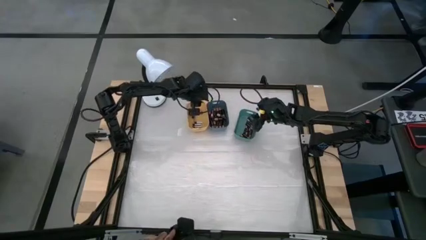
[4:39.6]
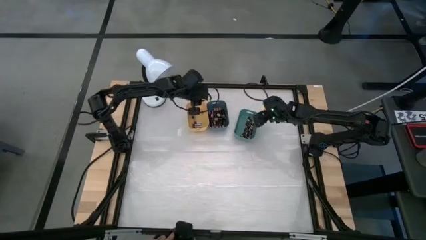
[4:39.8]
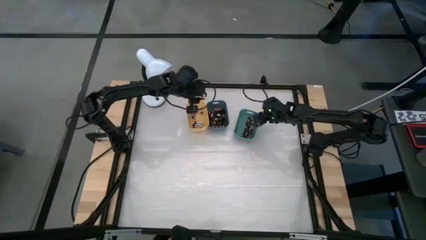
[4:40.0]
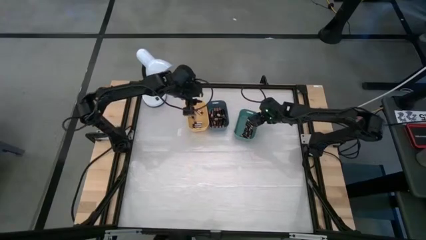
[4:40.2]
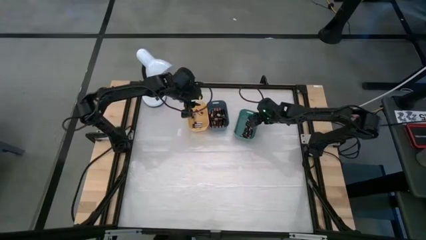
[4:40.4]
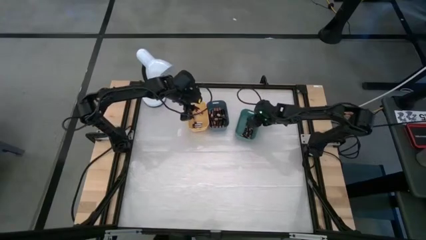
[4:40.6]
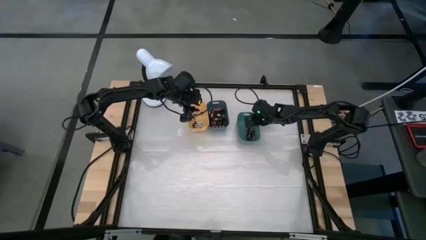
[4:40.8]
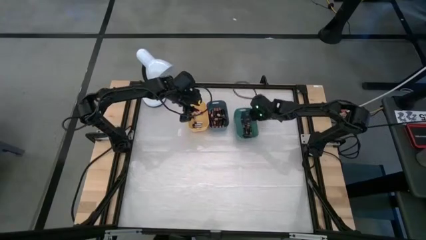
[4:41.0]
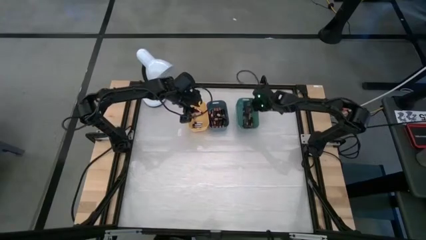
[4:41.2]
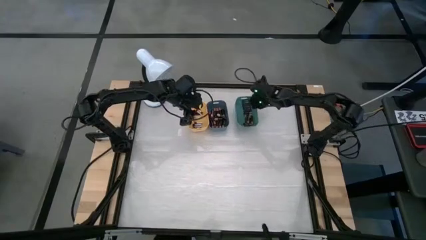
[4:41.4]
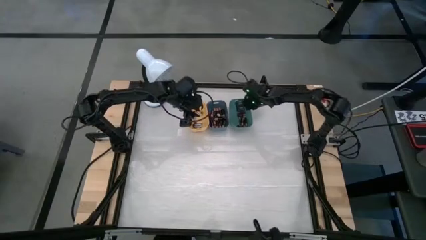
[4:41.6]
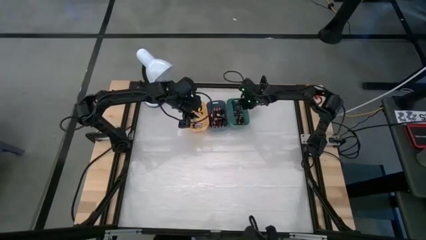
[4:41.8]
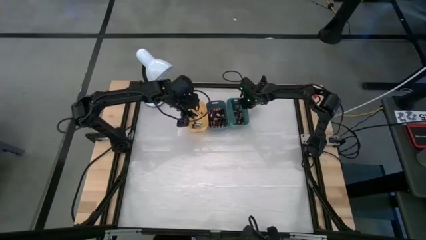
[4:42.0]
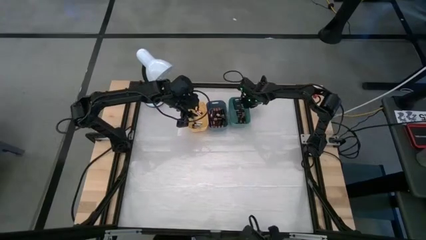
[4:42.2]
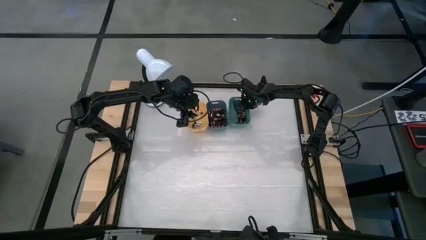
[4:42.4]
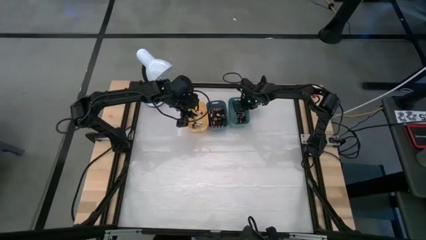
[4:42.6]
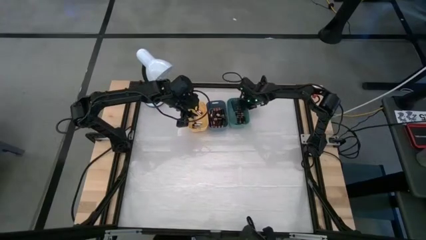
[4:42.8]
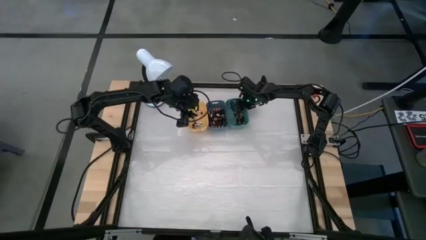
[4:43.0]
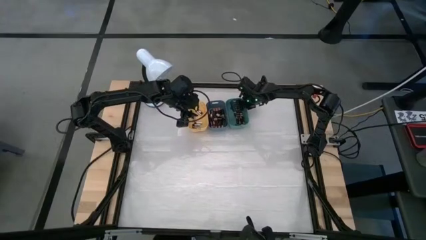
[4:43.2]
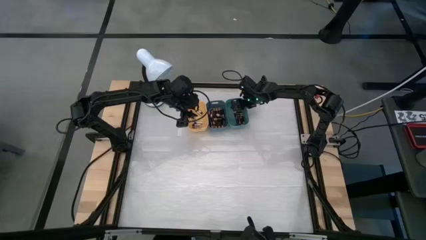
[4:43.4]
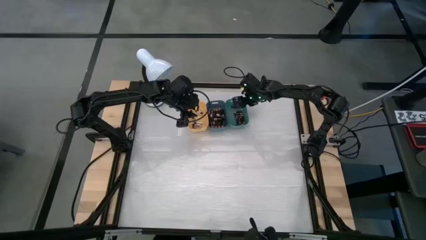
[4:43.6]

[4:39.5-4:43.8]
Task: Sort batteries
Adjust the green bin

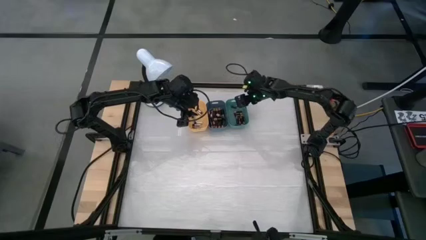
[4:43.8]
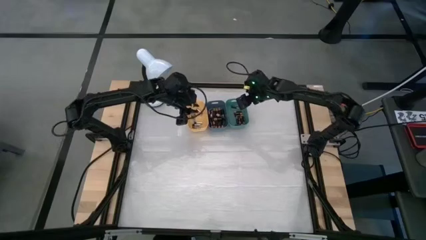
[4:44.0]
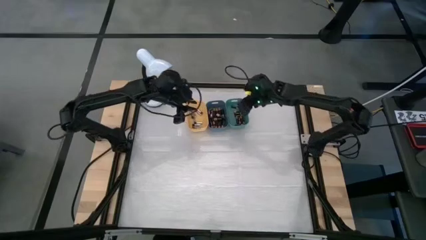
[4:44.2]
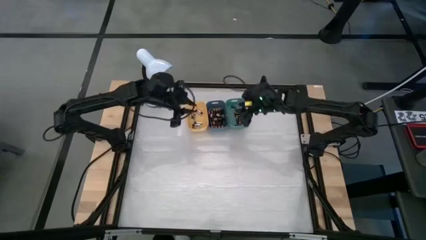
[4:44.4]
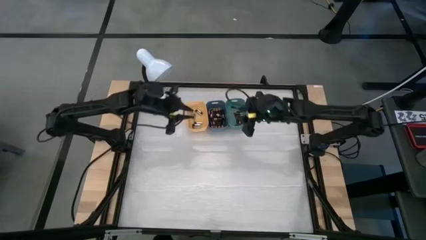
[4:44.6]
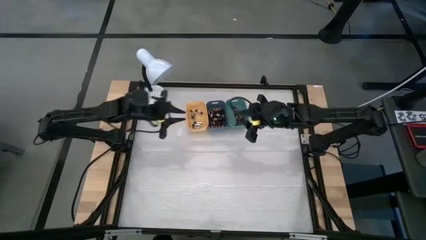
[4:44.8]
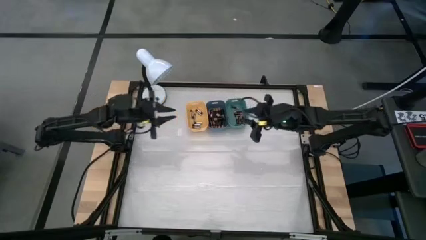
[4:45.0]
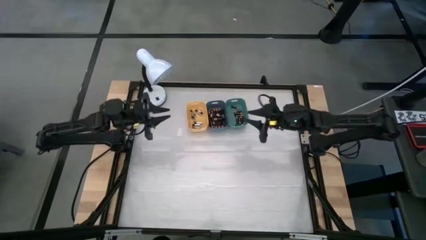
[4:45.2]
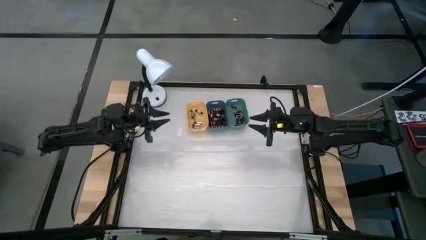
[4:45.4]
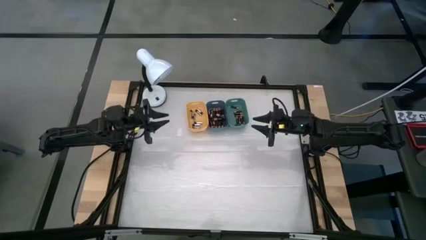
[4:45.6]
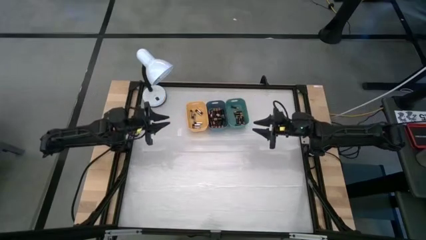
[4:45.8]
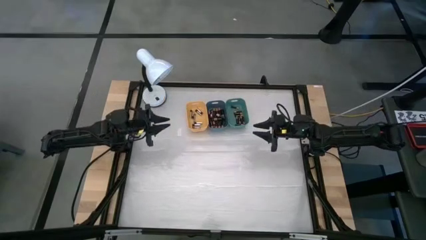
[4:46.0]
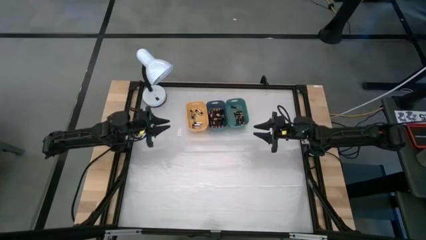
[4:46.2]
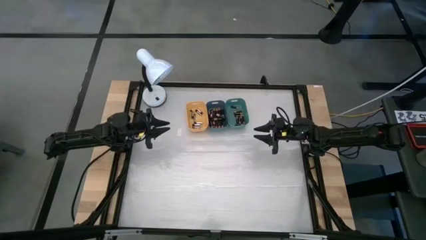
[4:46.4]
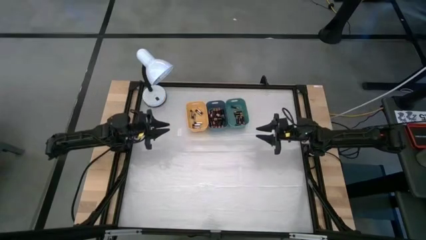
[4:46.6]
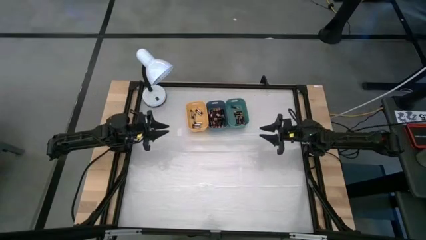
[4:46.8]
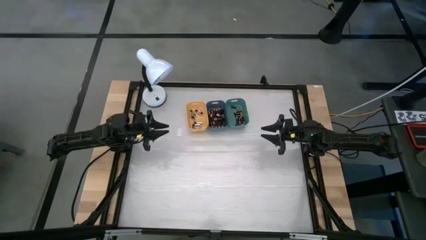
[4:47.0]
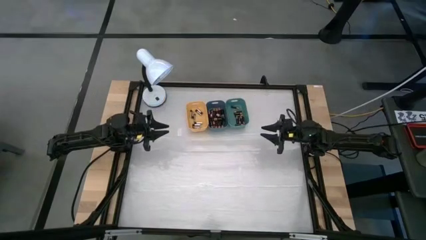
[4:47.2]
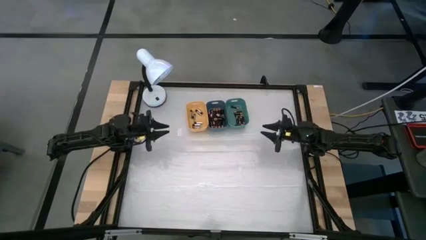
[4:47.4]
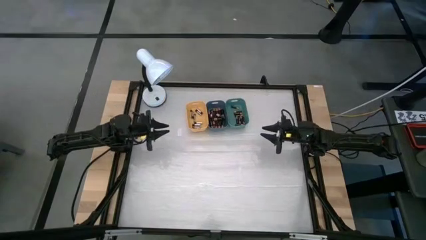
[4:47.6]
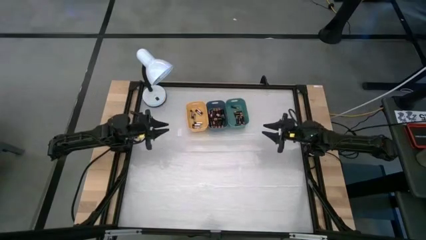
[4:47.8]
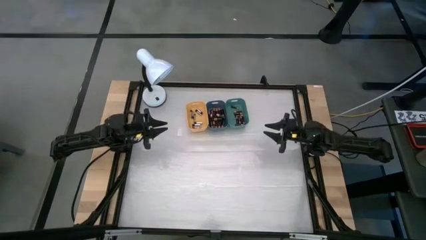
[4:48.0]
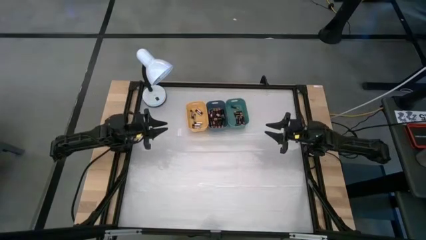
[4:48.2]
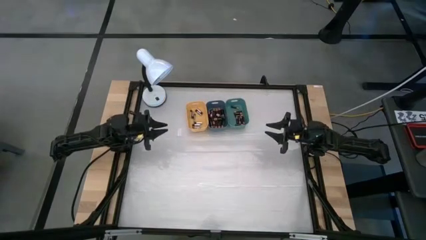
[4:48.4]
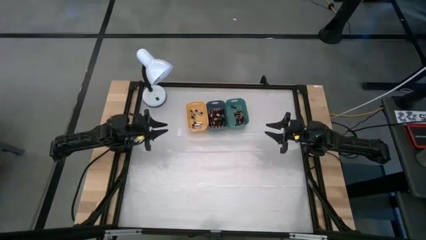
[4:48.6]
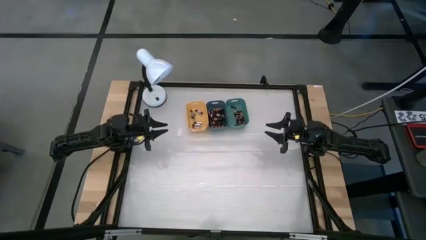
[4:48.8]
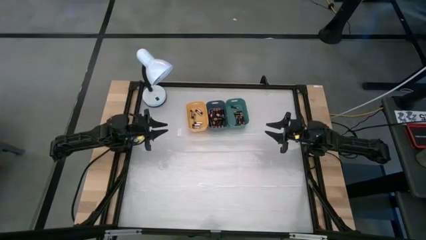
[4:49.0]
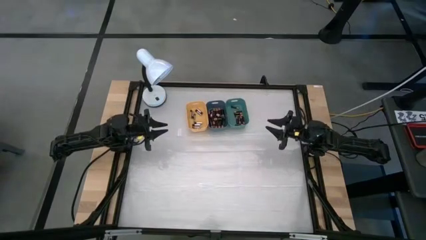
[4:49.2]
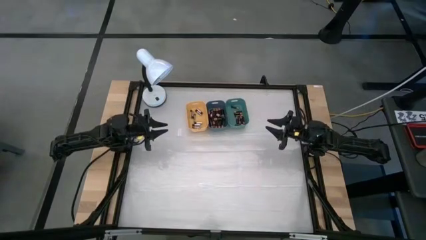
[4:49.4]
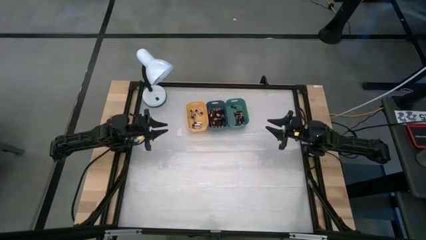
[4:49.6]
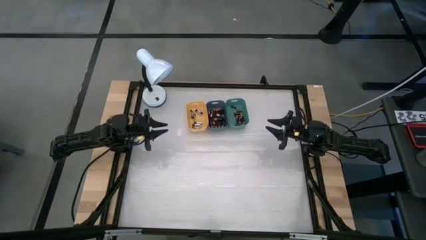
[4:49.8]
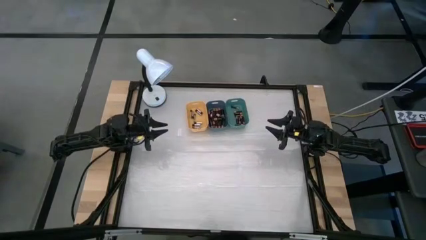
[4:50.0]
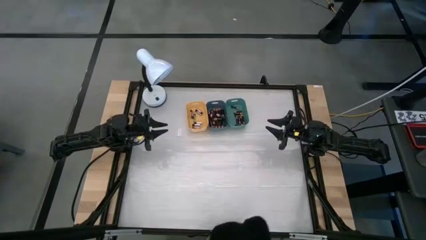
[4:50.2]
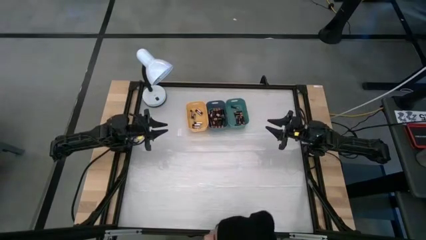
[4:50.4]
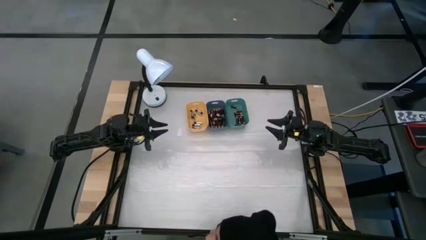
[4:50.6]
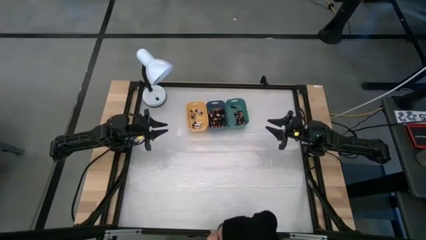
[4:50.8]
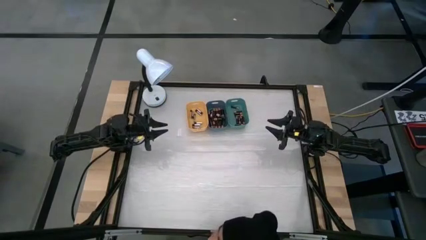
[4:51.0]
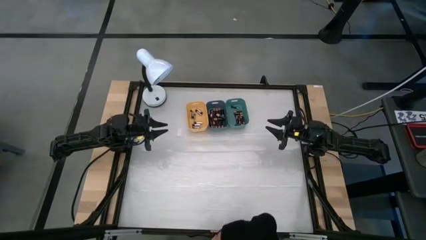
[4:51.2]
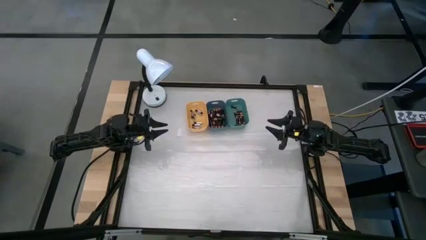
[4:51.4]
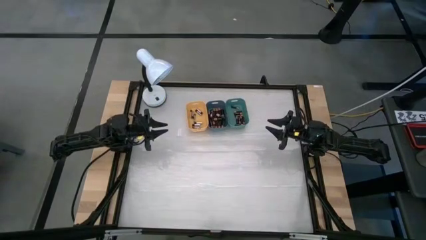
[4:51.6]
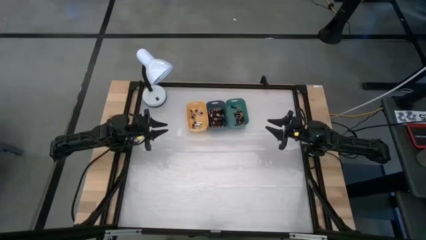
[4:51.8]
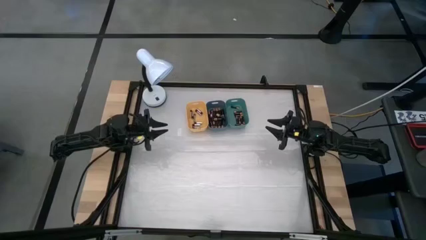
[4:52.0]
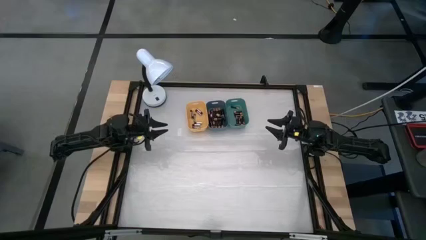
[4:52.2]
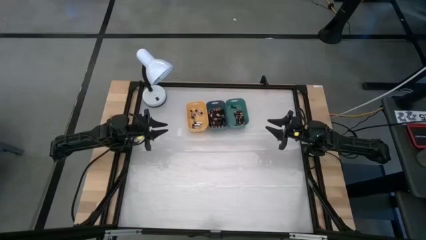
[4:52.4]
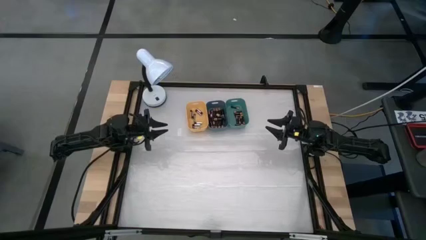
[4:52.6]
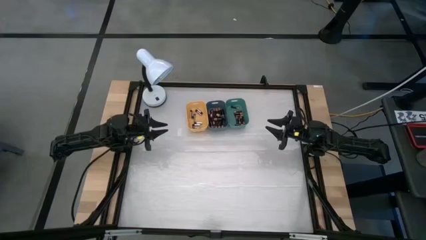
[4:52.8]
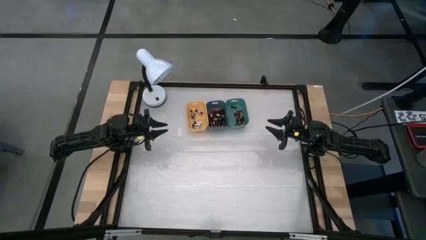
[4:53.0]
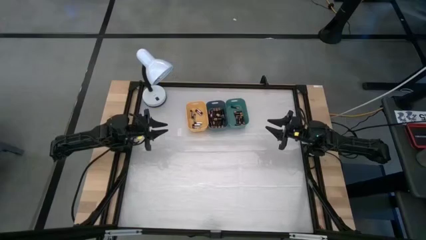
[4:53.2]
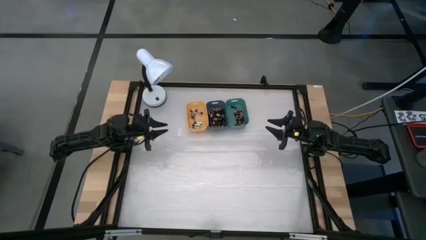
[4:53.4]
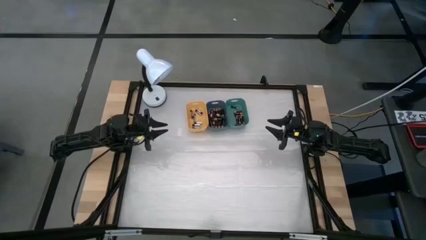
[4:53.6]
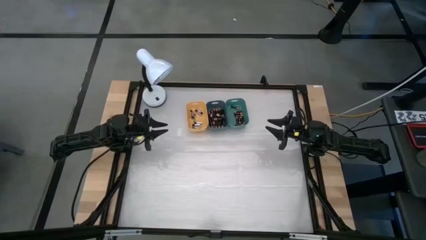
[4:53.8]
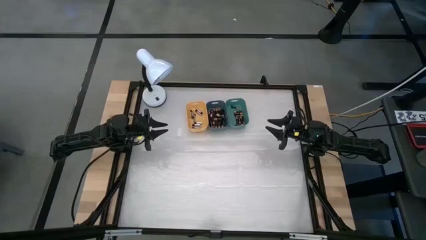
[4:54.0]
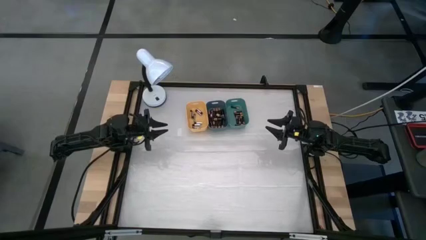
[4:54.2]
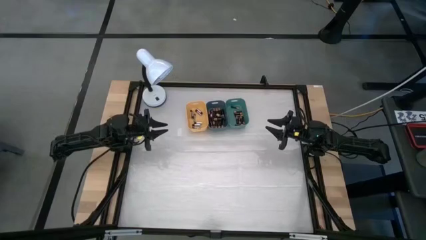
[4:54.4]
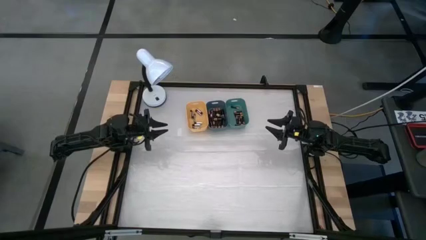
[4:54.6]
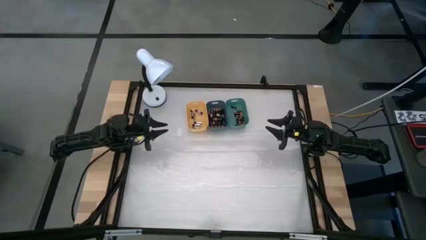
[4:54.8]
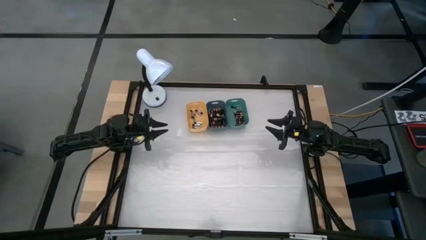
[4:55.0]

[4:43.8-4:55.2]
Return to Home Position
